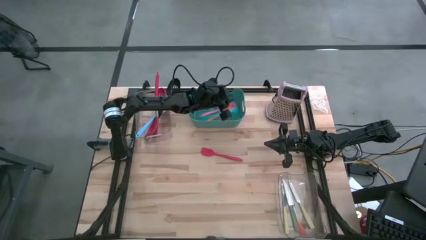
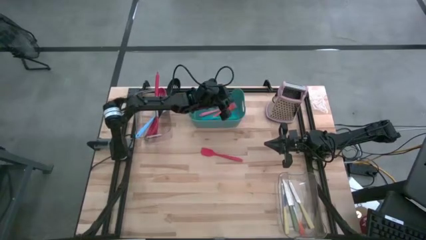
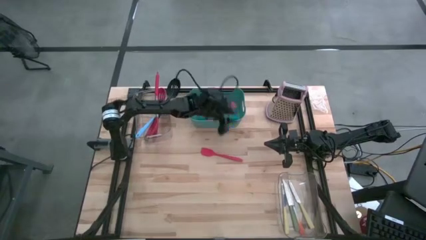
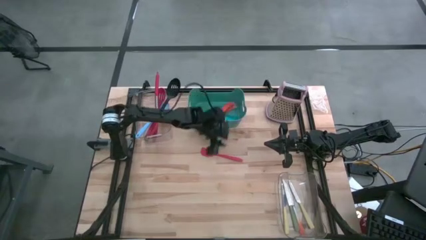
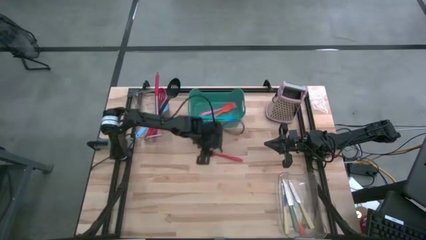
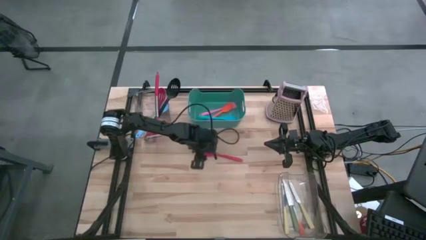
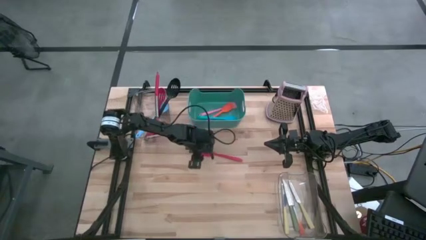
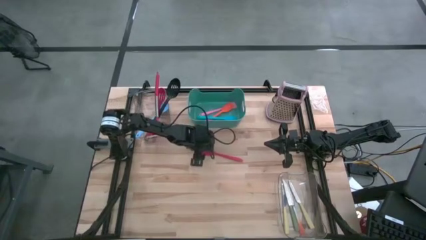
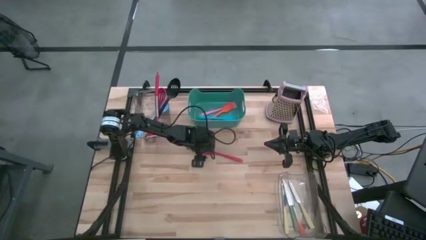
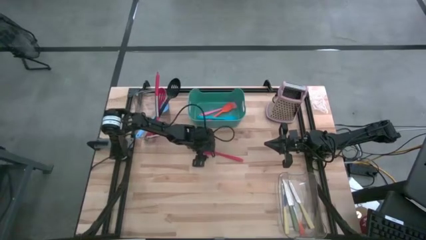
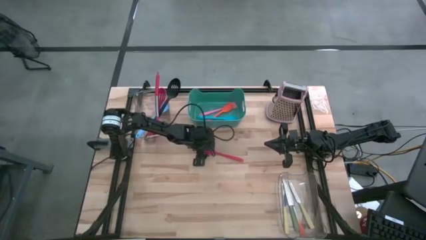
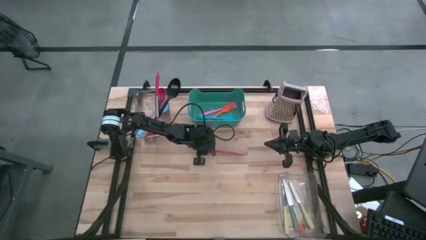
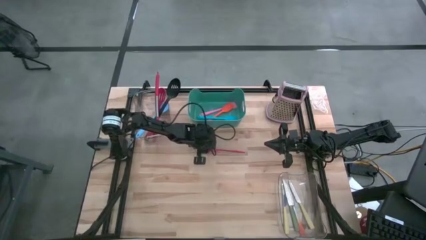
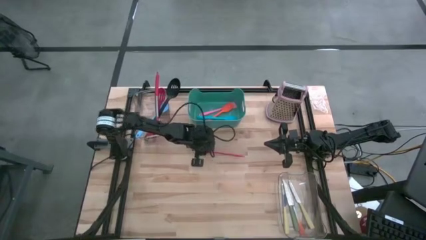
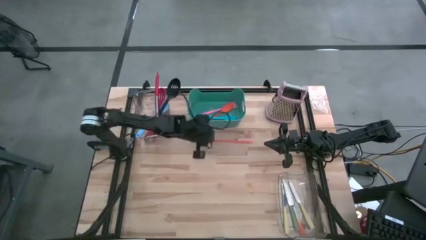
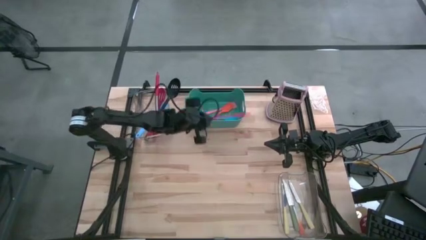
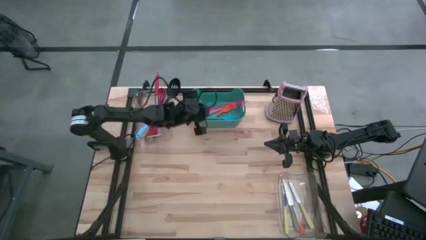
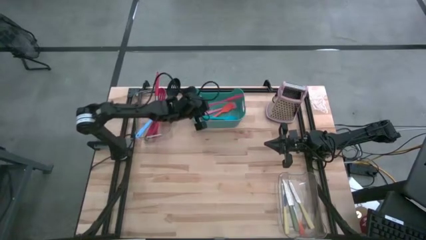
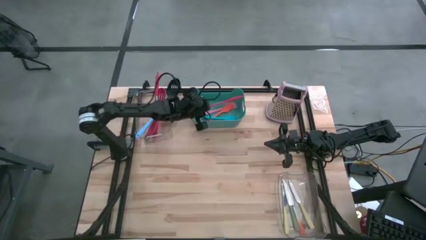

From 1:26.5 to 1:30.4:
Task: Pick & Place Kitchen Items
Put the red spatula into the green bin

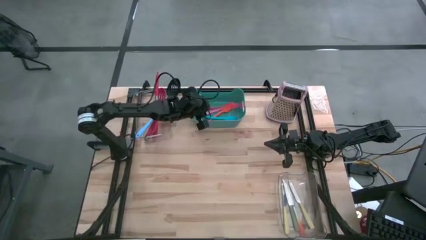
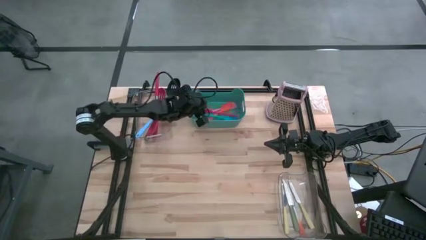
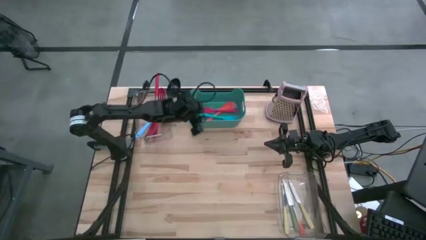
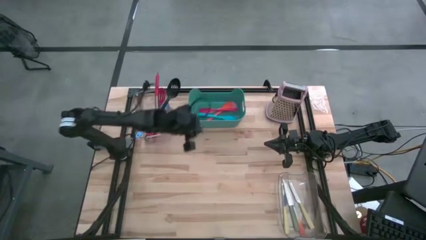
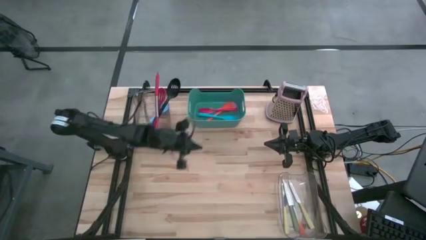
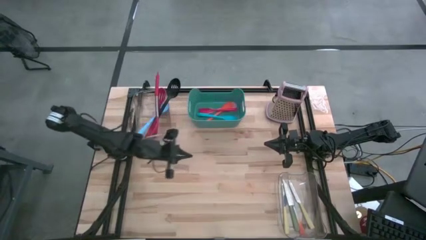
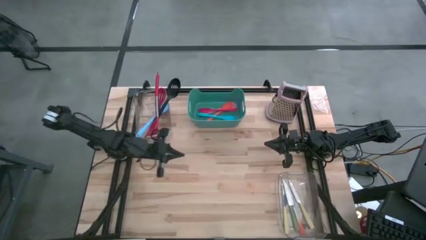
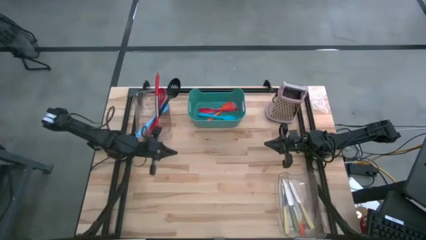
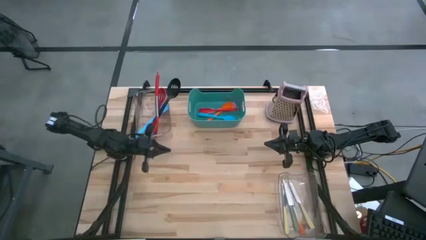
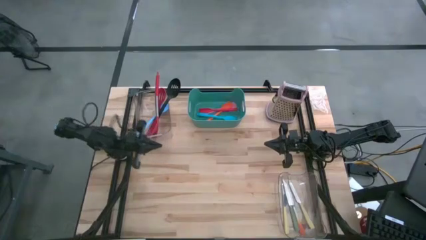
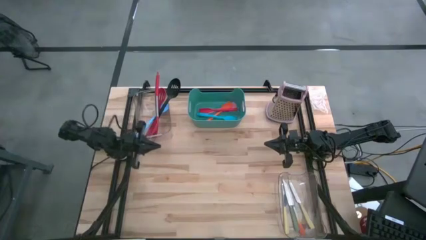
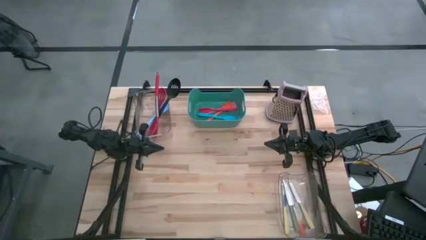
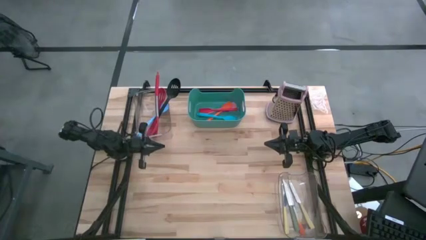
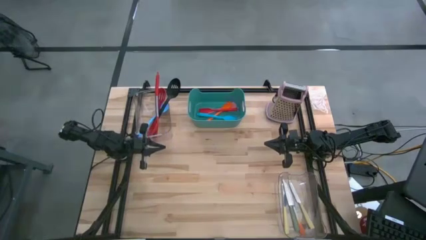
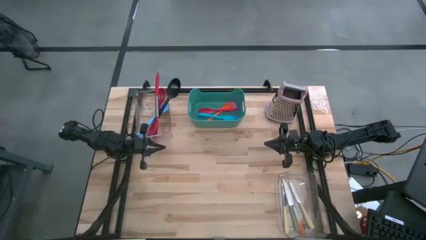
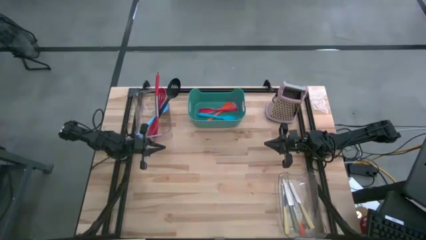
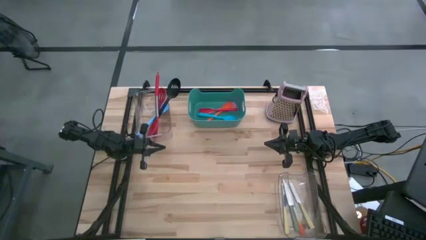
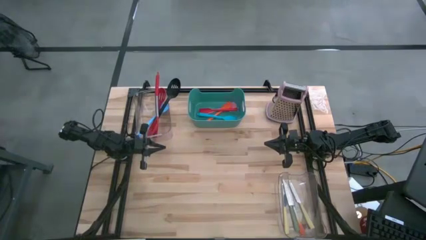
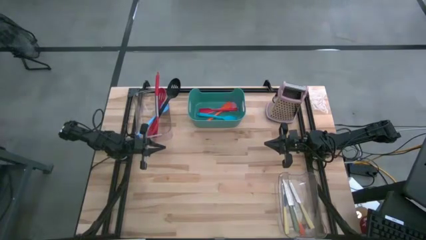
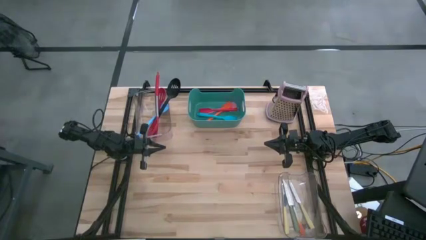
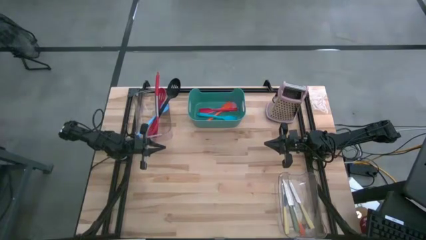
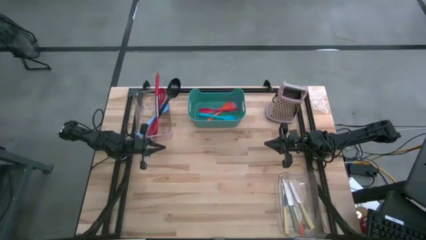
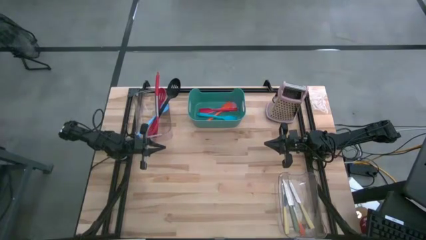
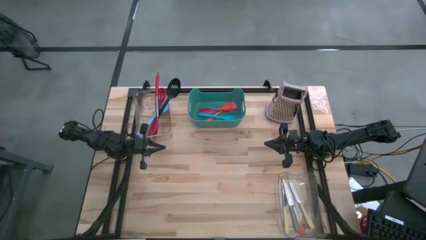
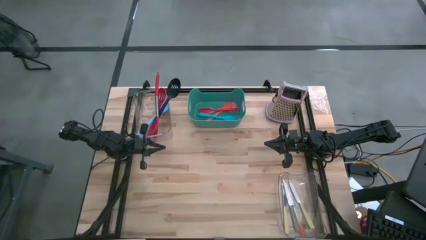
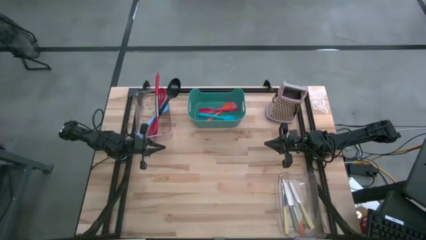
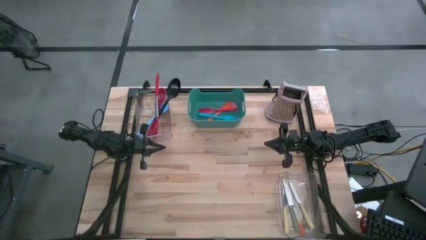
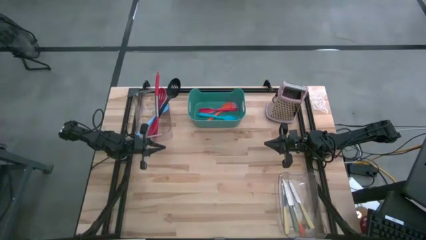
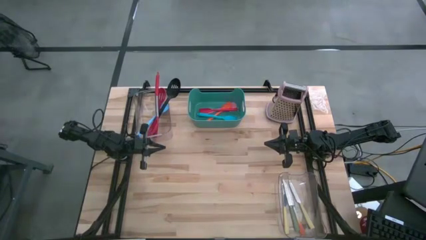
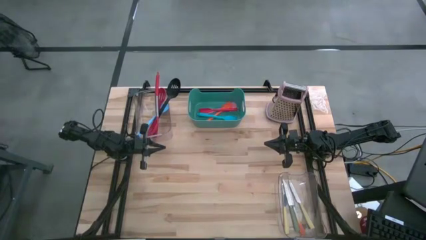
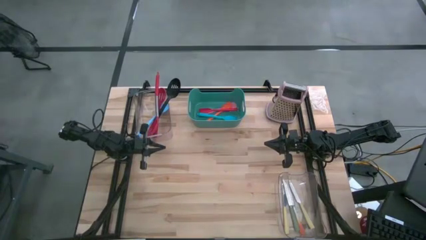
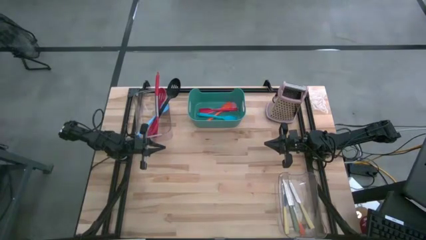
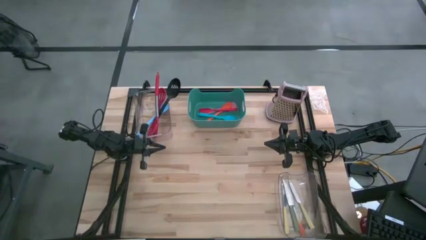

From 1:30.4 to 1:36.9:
Return to Home Position

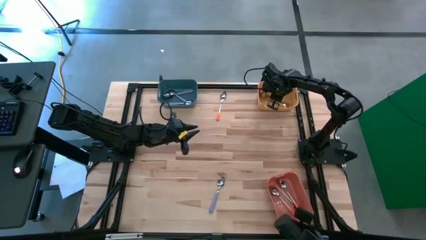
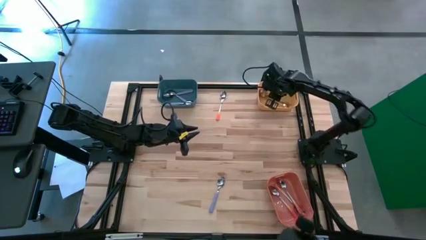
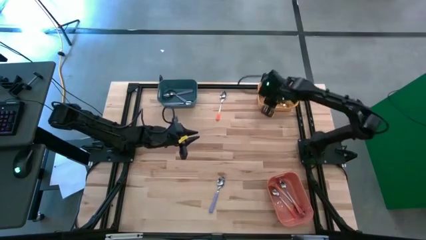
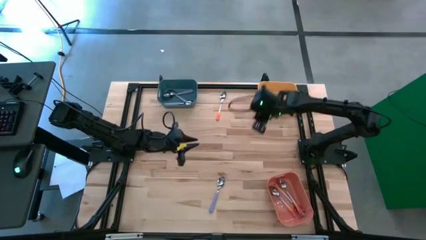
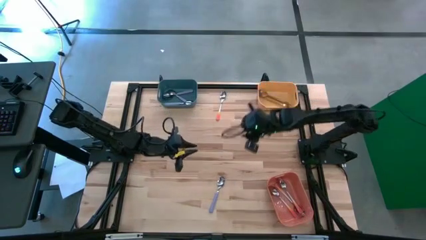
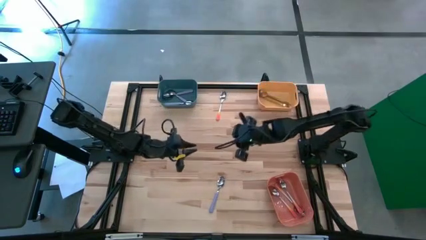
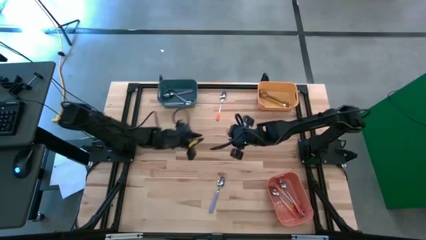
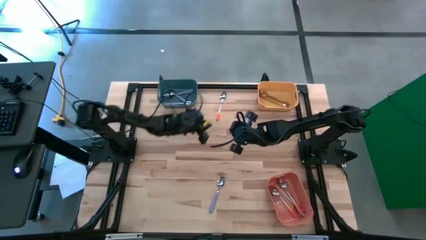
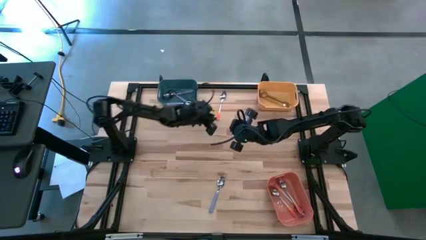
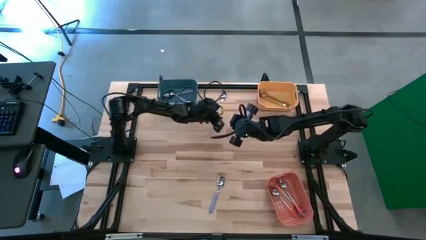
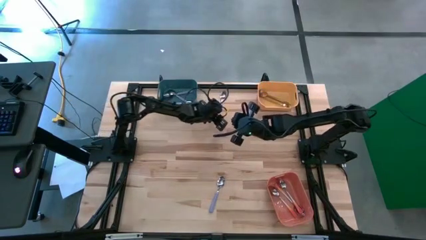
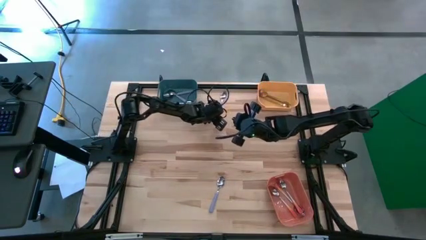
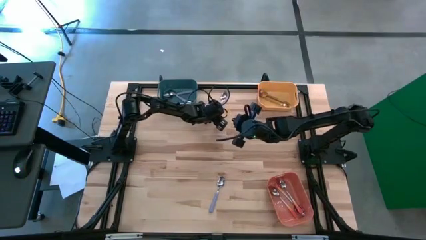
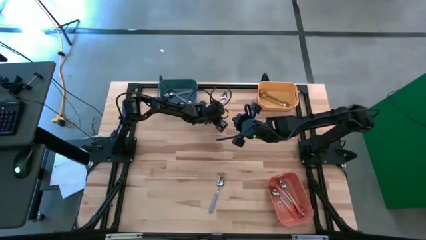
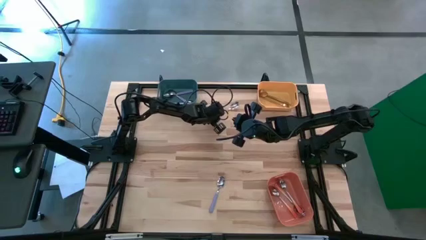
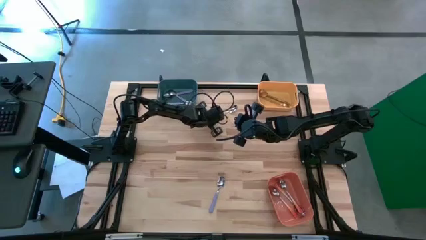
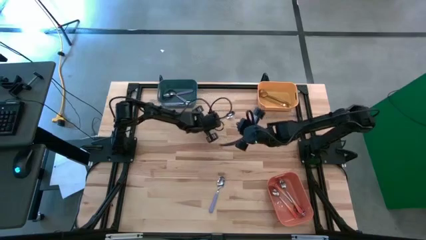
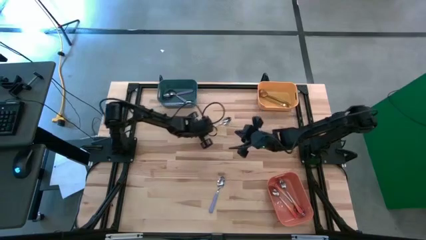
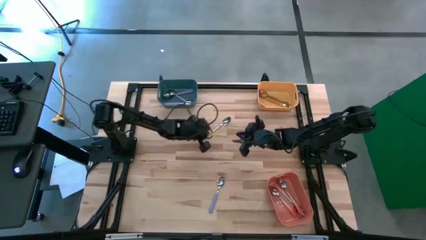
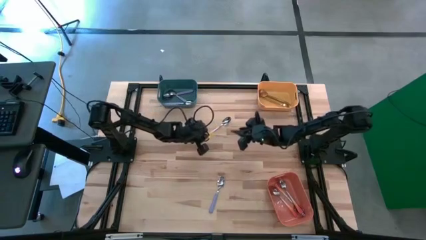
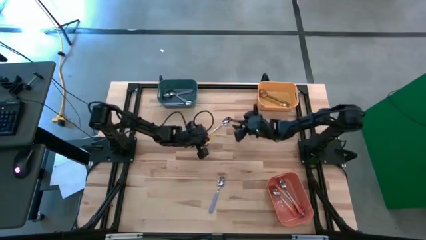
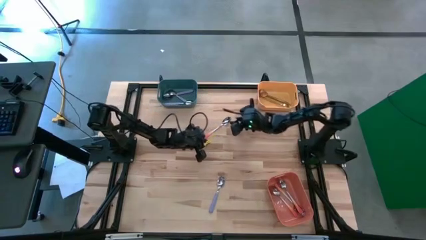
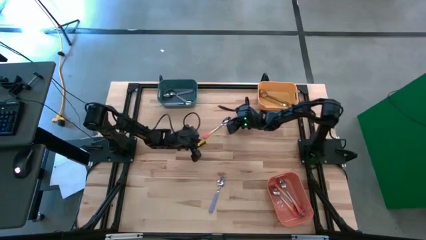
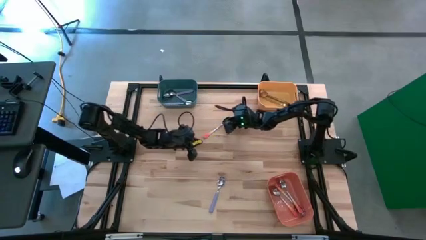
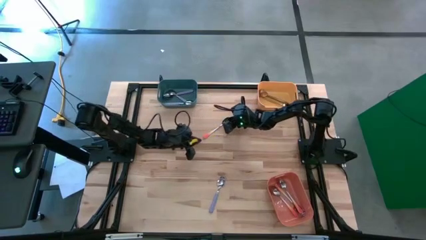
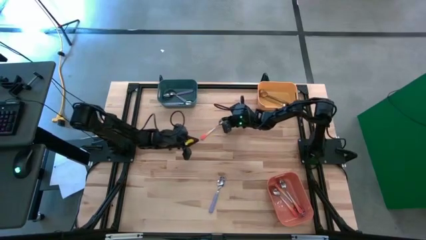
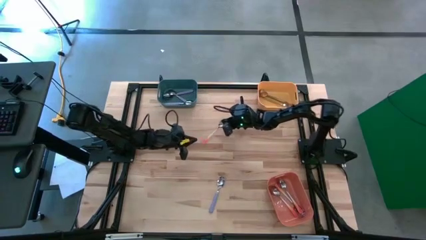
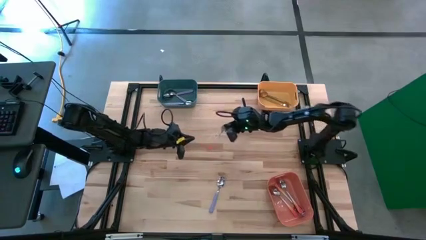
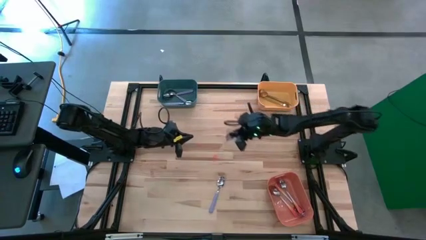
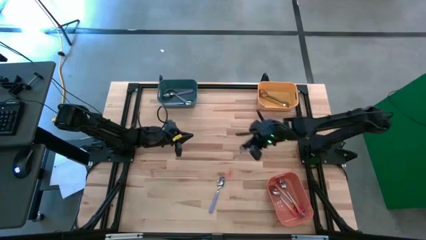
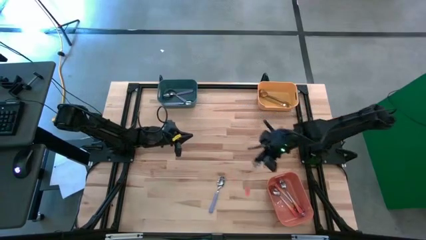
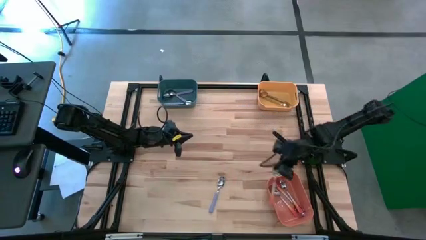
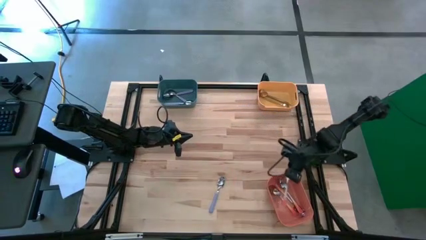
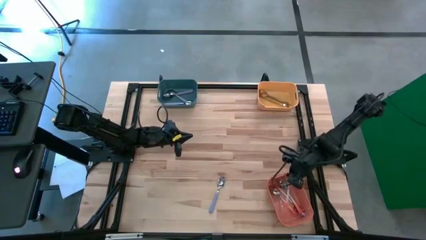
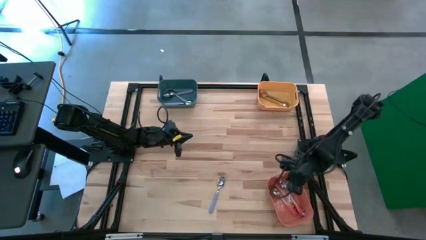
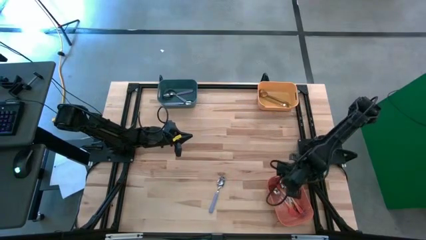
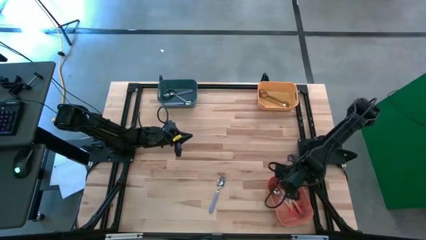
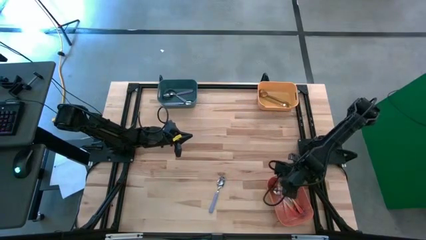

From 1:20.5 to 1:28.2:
Task: Sort silverware by color (type)
Put the orange spoon into the orange bin
